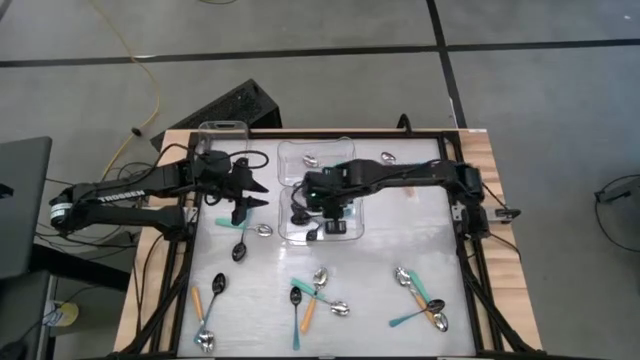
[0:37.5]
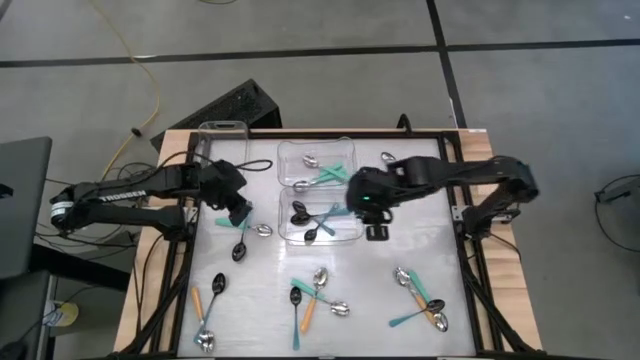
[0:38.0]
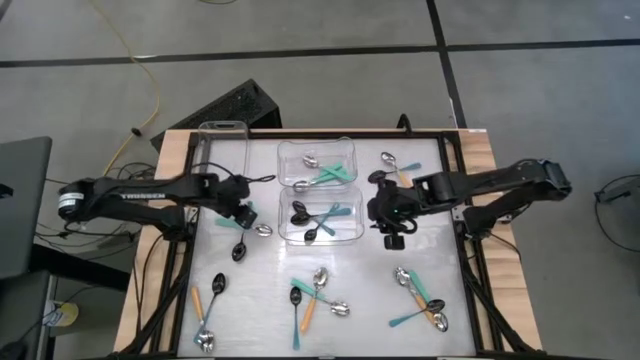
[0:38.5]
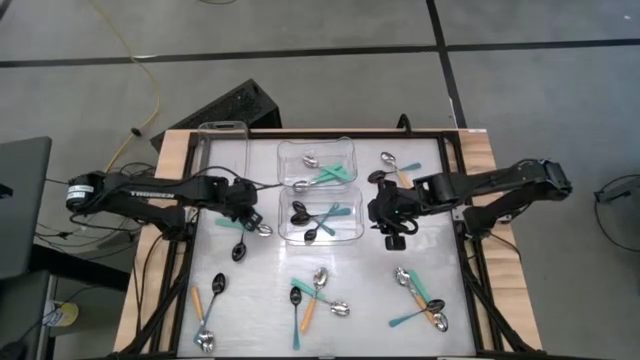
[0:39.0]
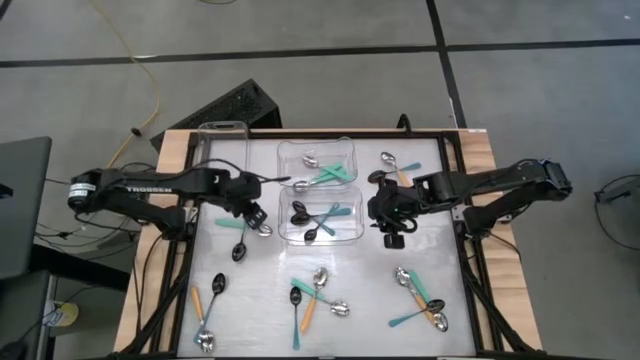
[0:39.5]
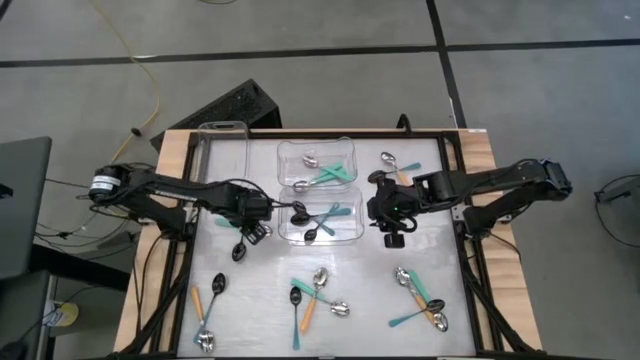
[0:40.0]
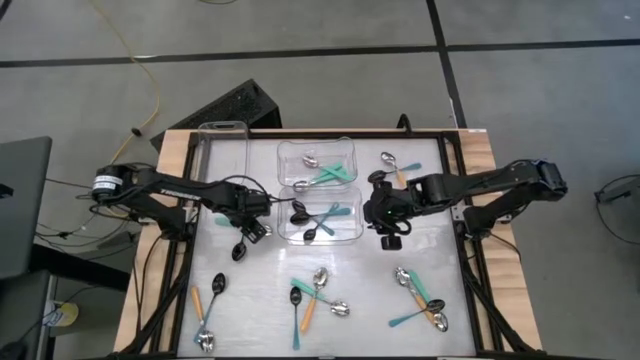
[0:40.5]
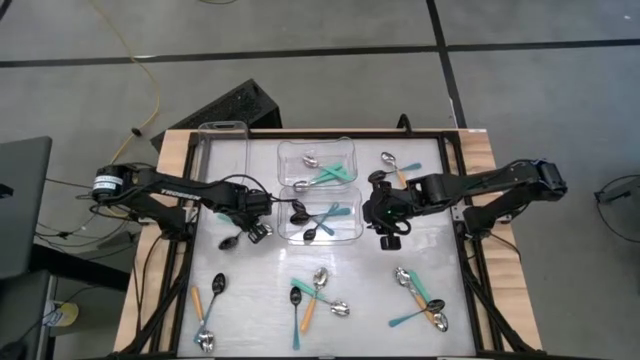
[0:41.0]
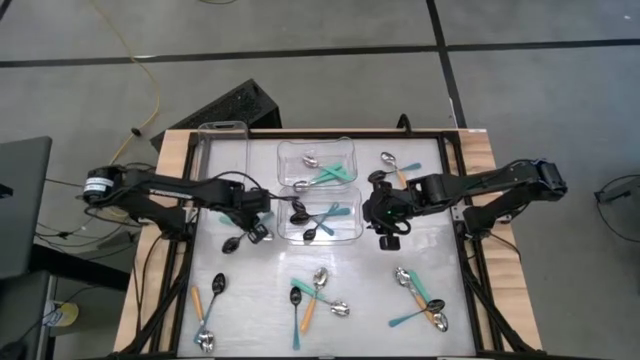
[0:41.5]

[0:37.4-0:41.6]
Task: Sort silverware by color (type)
Put the blue spoon into the bottom transparent bin

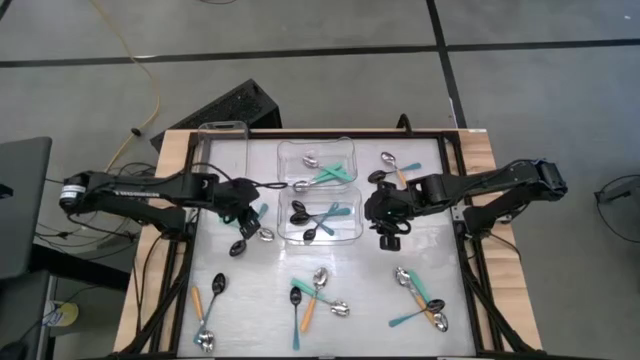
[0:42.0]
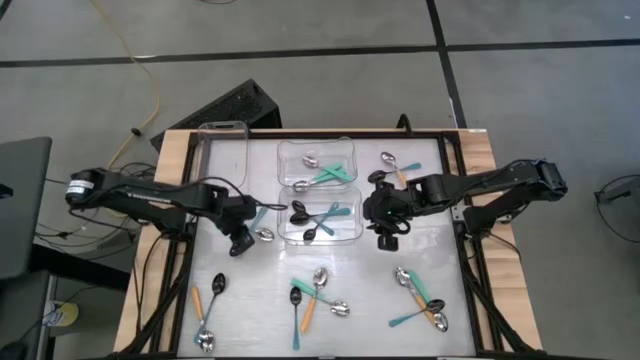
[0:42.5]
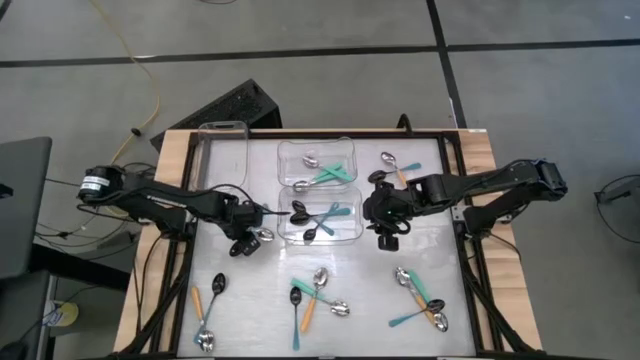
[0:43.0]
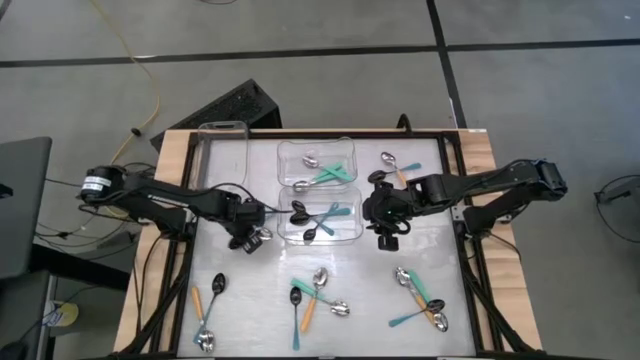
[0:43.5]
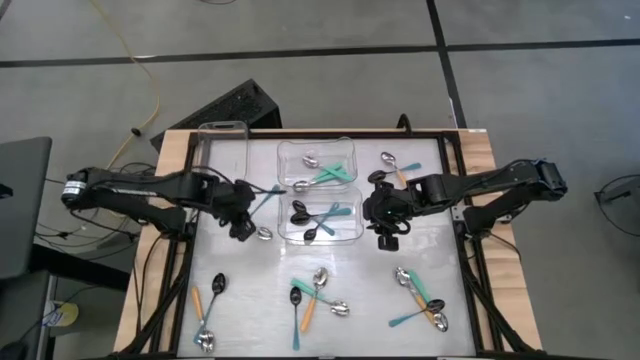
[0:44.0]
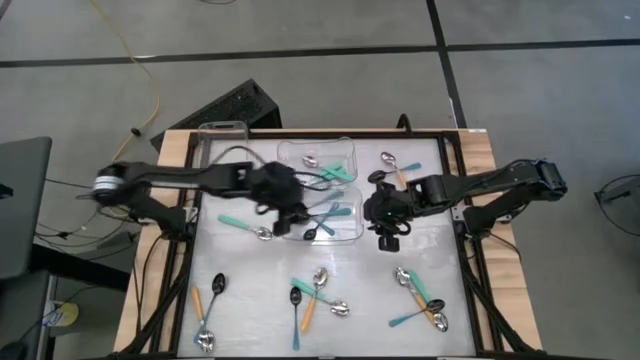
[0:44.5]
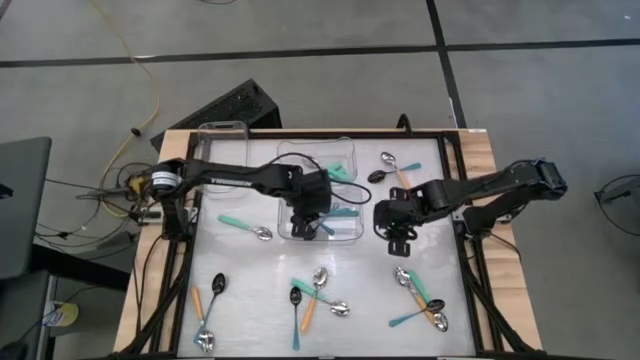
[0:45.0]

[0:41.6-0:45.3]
Put the blue spoon into the bottom transparent bin

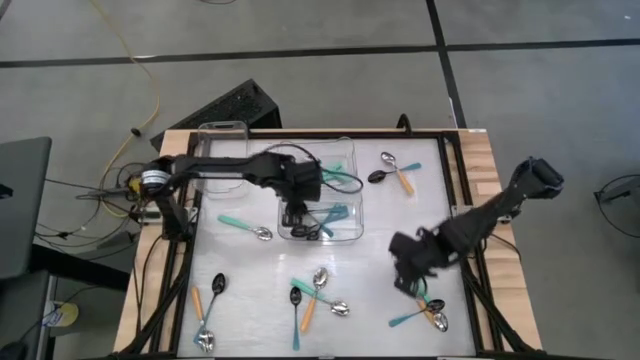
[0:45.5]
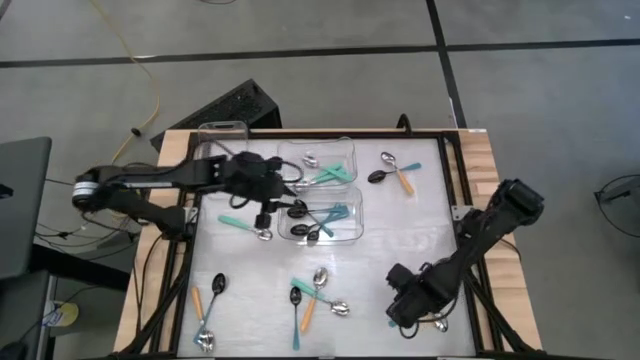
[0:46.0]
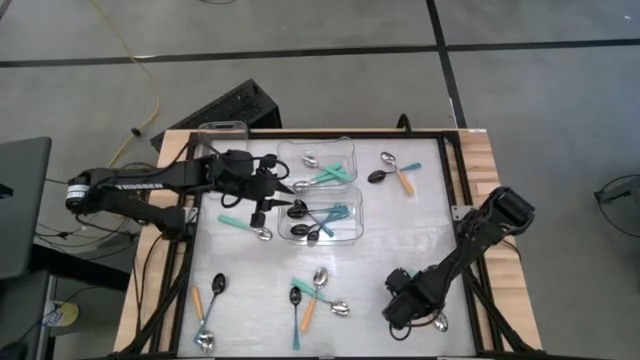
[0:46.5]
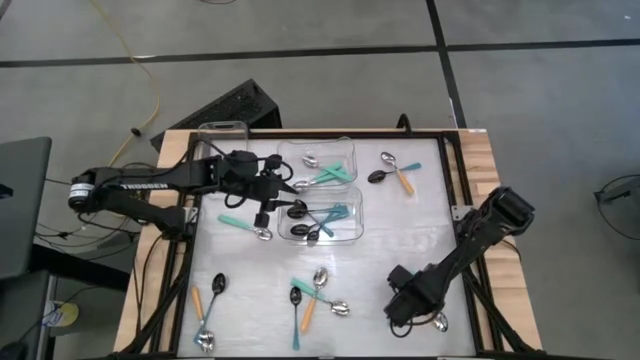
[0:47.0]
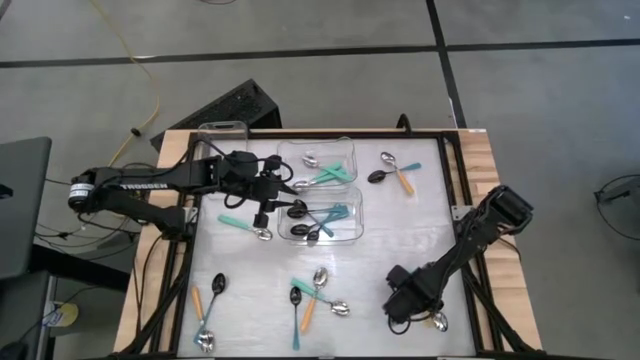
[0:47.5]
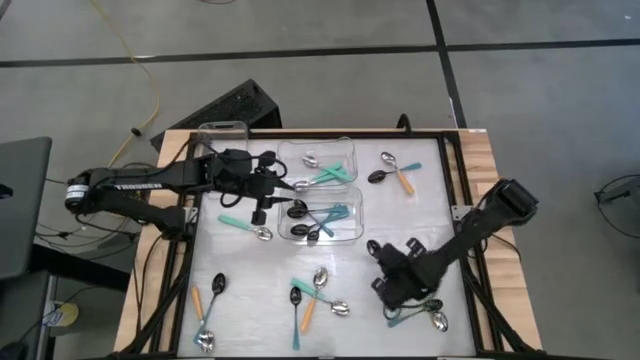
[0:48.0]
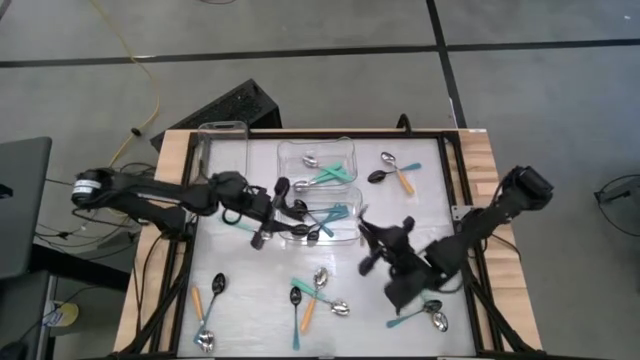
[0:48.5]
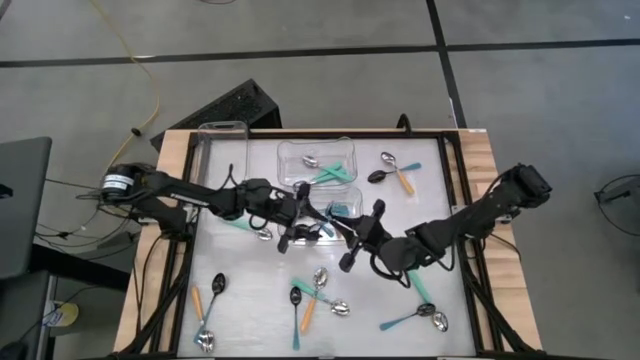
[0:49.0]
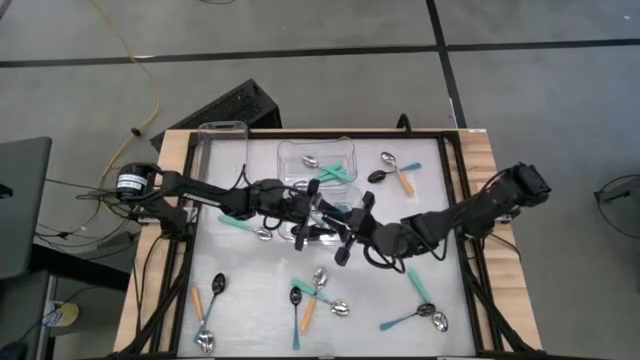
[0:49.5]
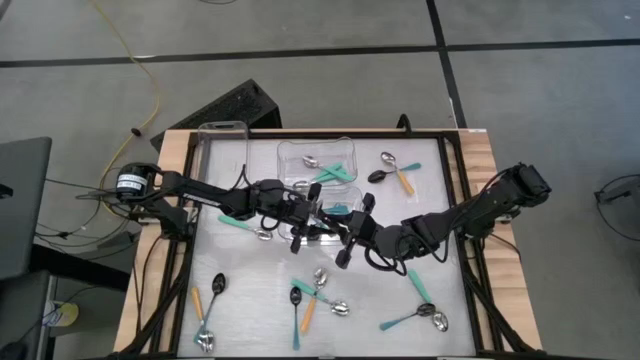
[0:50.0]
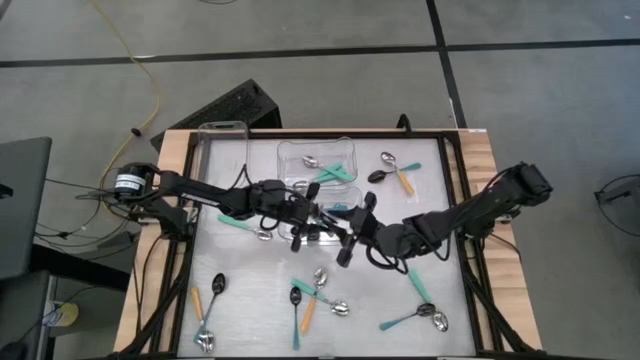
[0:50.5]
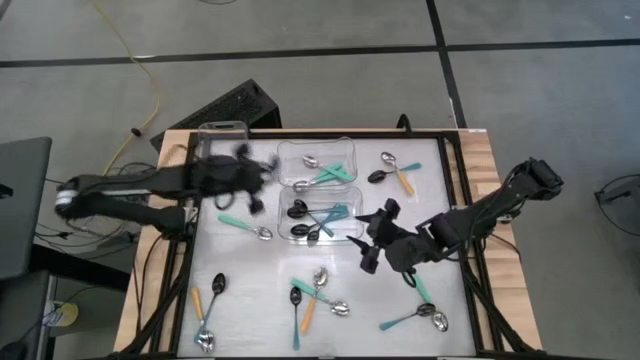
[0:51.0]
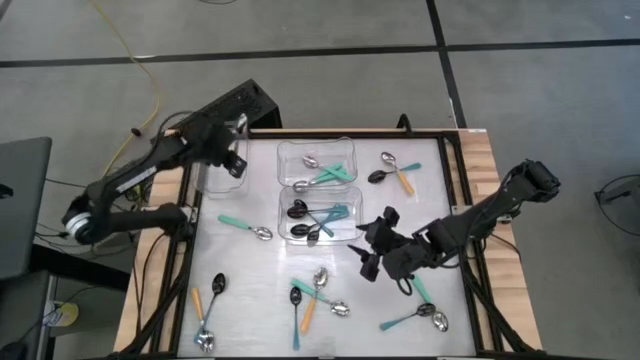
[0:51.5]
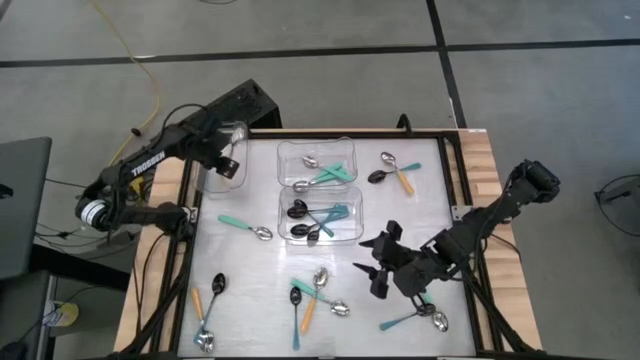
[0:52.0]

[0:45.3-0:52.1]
Put the yellow spoon into the top left transparent bin

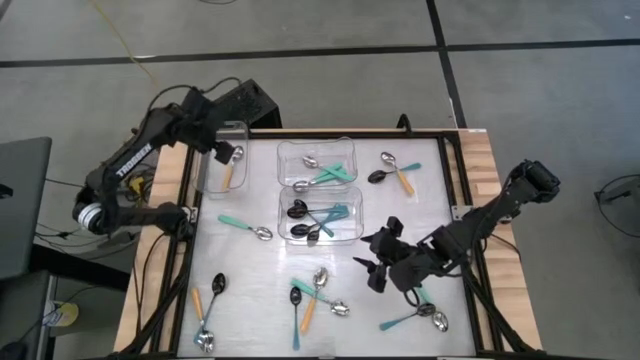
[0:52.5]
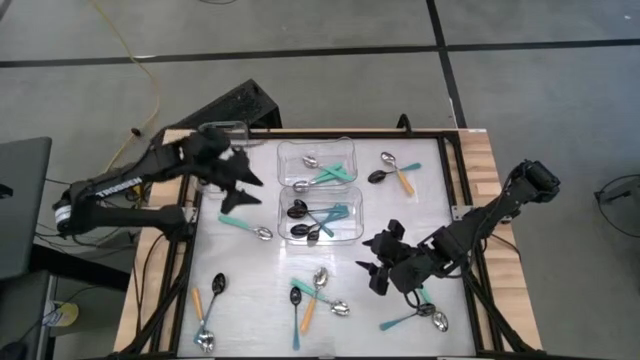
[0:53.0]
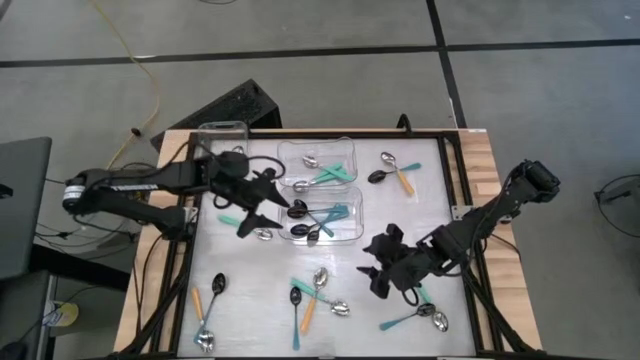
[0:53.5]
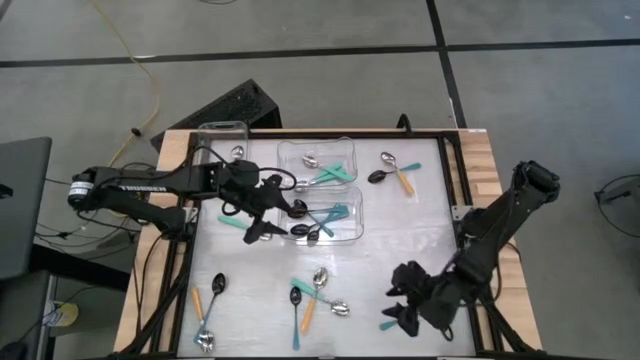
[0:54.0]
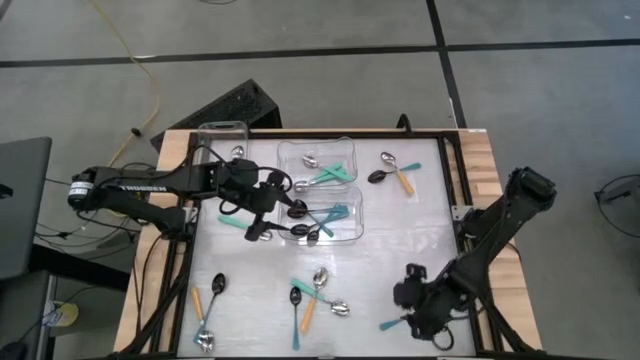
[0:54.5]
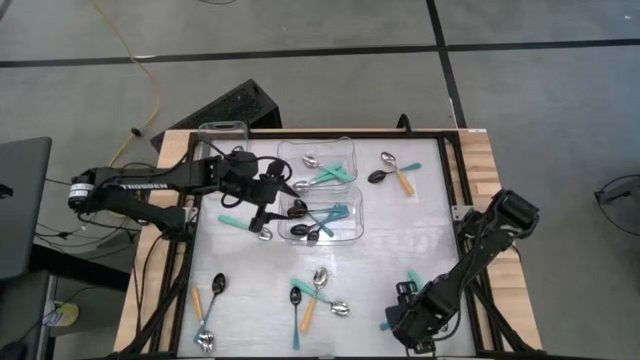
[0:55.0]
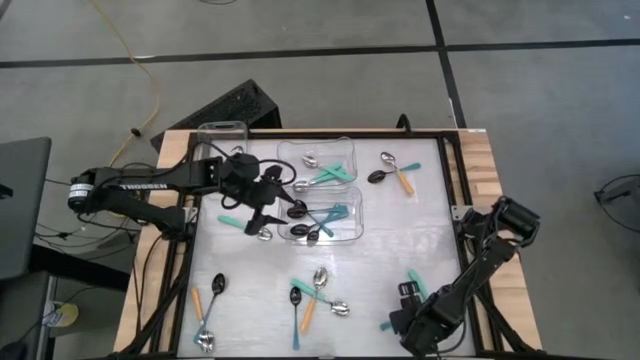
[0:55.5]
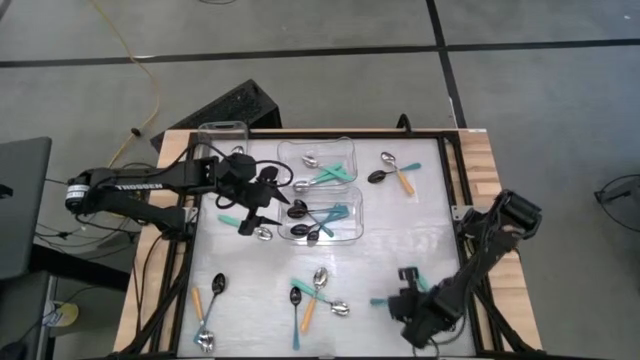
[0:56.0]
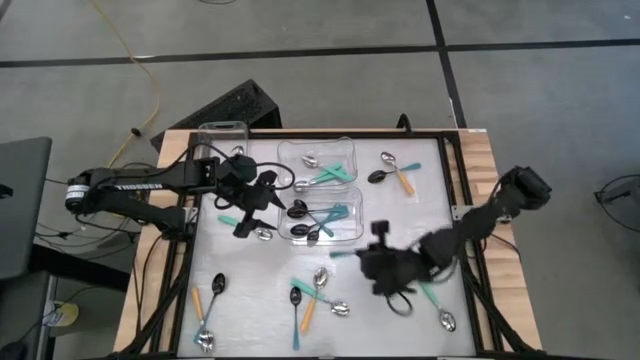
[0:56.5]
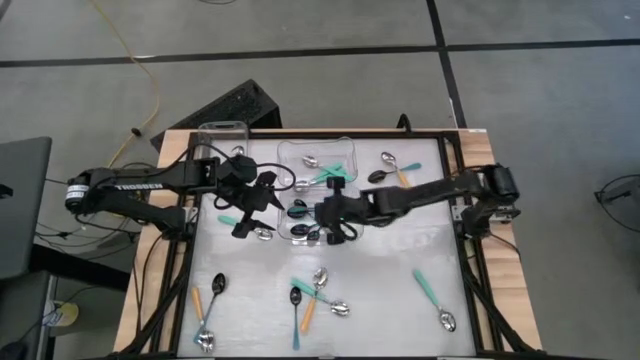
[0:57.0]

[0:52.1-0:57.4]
Put the blue spoon into the bottom transparent bin
